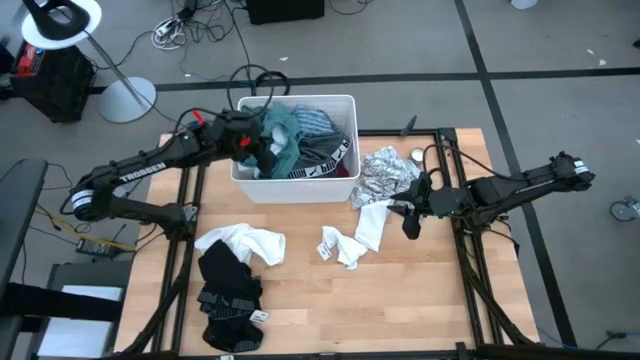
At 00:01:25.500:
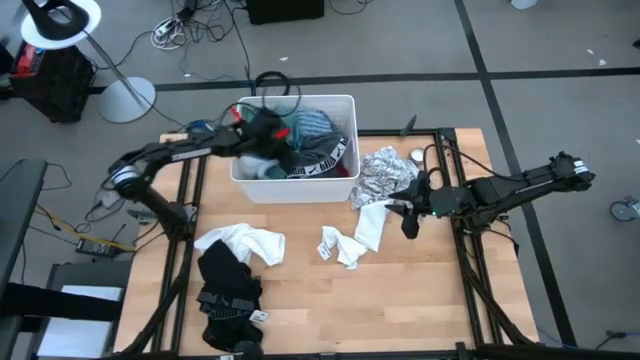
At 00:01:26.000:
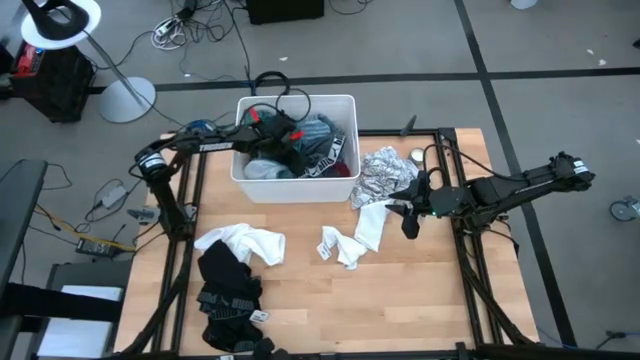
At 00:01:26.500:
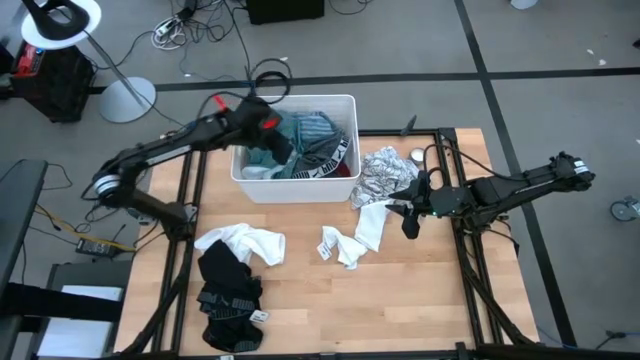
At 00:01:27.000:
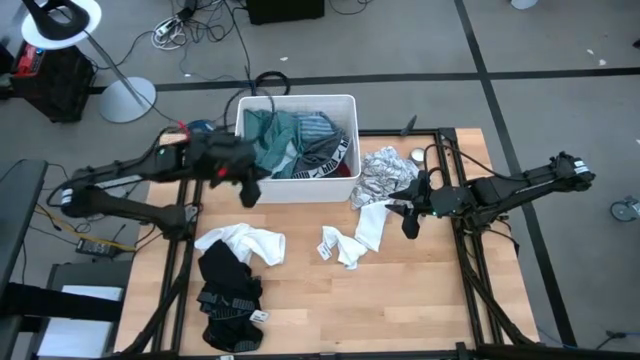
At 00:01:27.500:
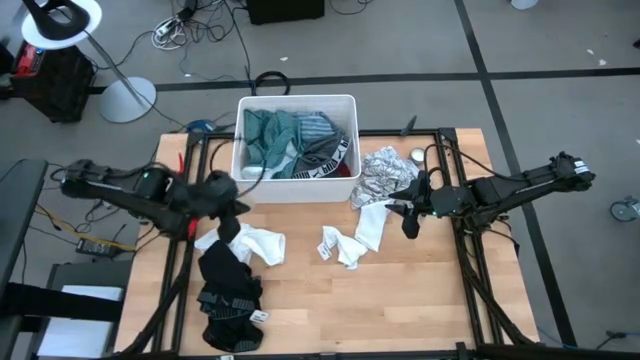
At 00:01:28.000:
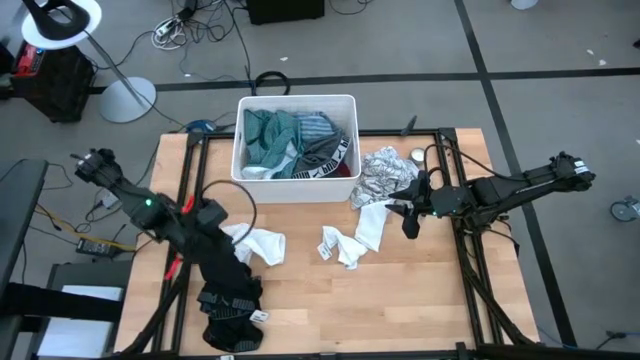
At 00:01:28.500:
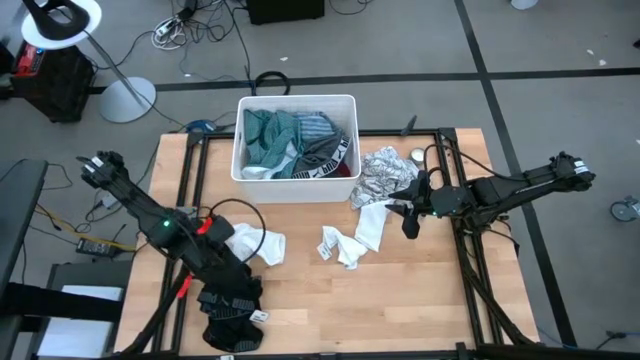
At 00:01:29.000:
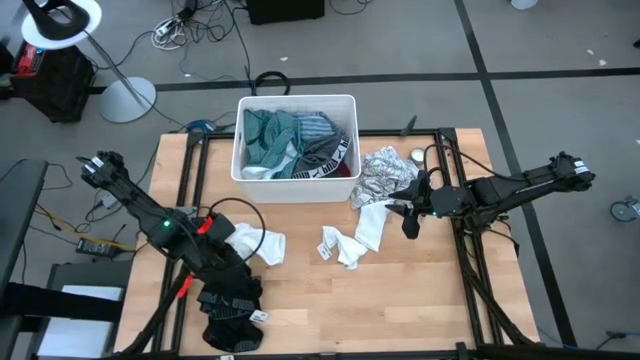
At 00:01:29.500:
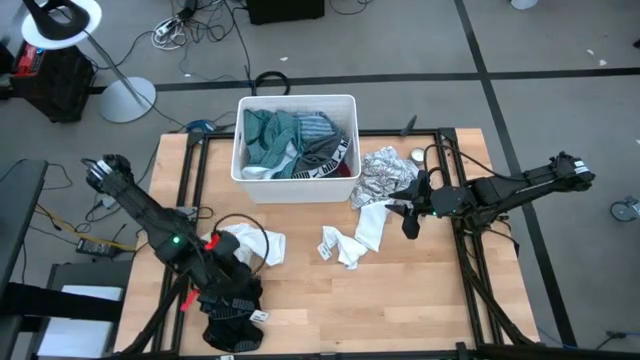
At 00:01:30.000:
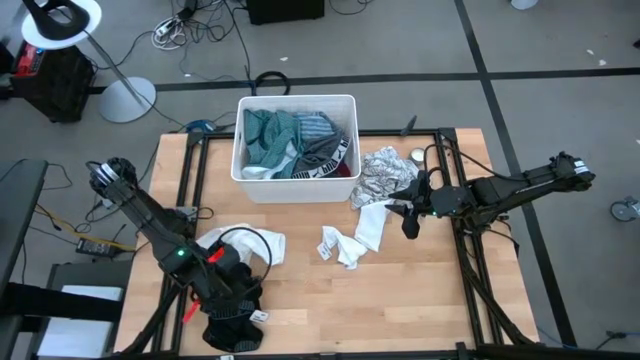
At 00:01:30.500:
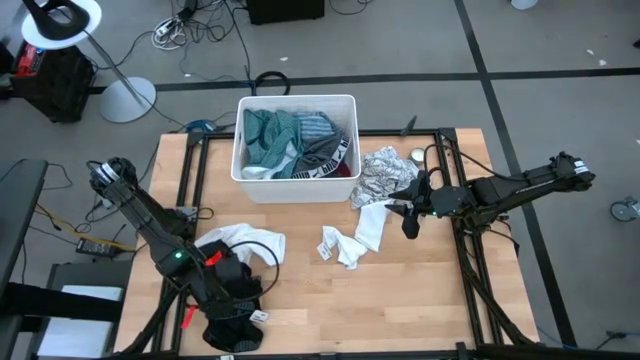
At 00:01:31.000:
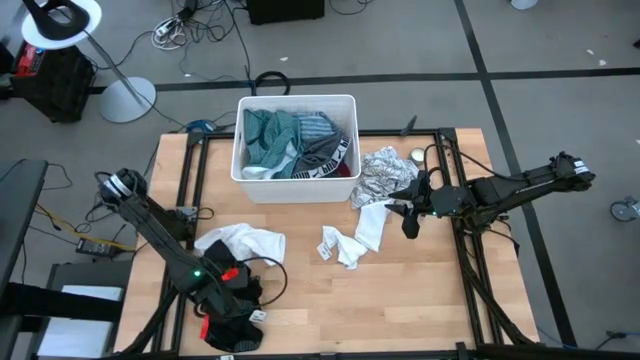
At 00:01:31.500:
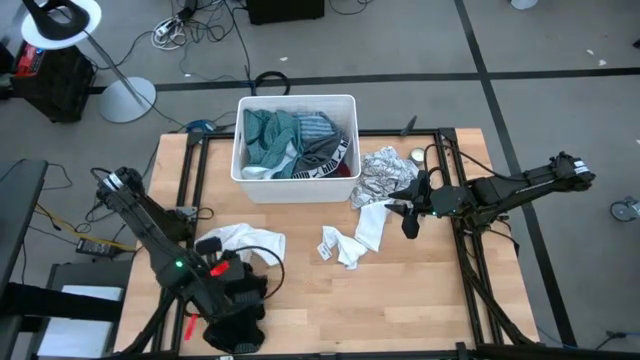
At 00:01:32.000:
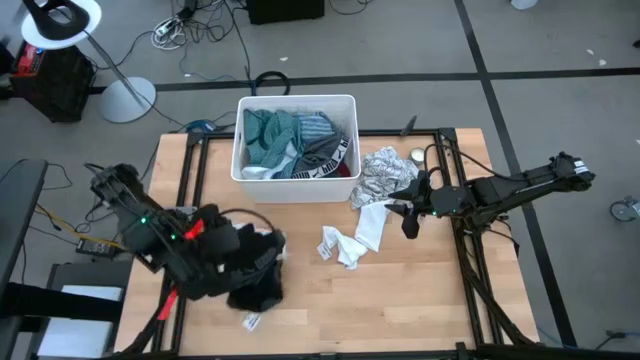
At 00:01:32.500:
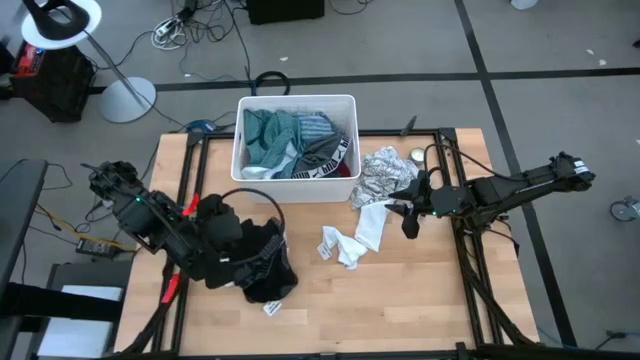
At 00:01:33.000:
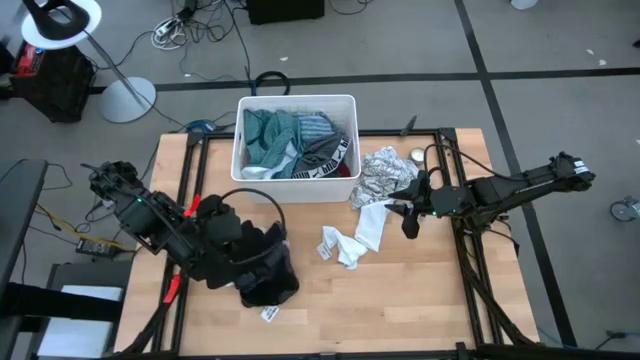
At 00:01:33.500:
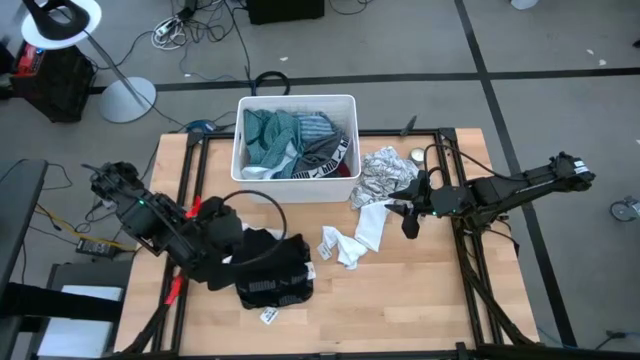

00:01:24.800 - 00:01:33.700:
Task: Sort clothes
Put the black boxer short into the white laundry bin

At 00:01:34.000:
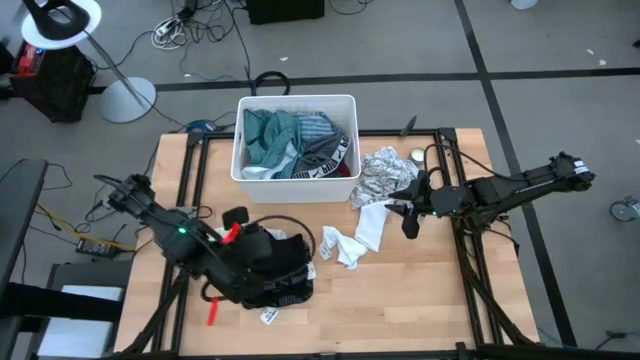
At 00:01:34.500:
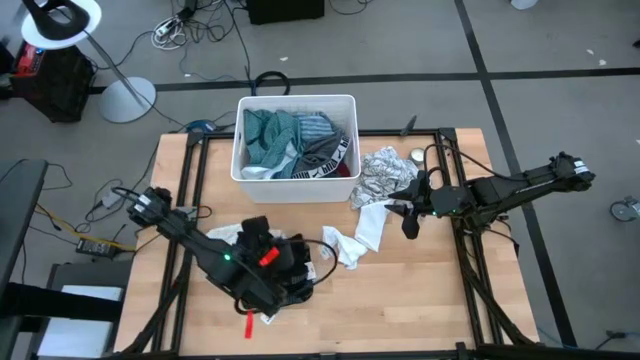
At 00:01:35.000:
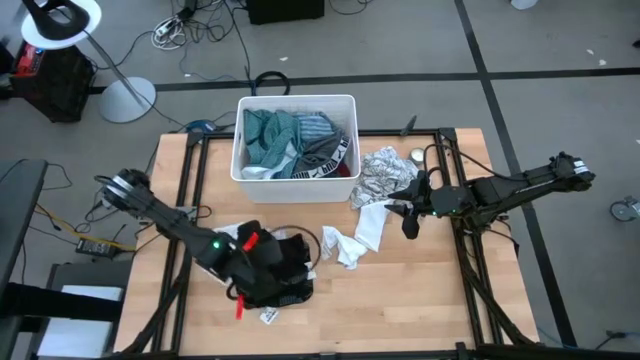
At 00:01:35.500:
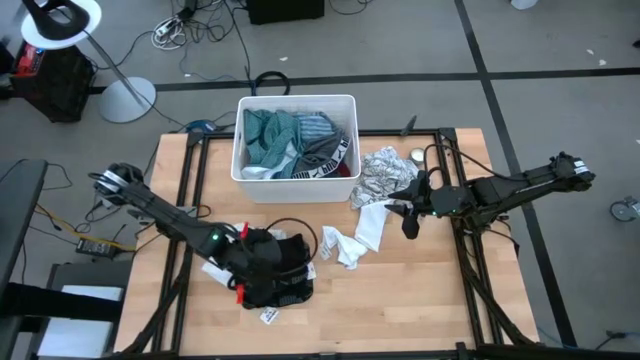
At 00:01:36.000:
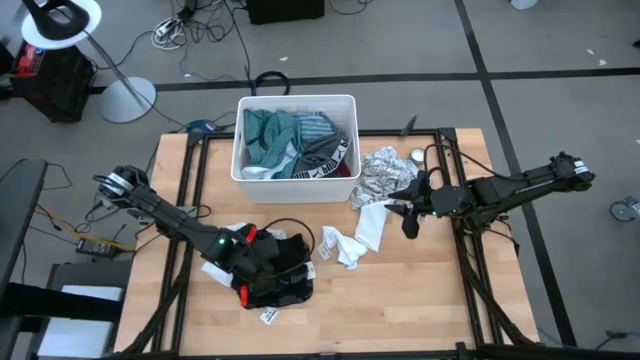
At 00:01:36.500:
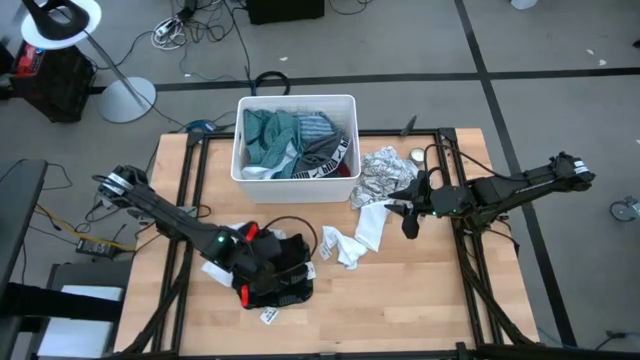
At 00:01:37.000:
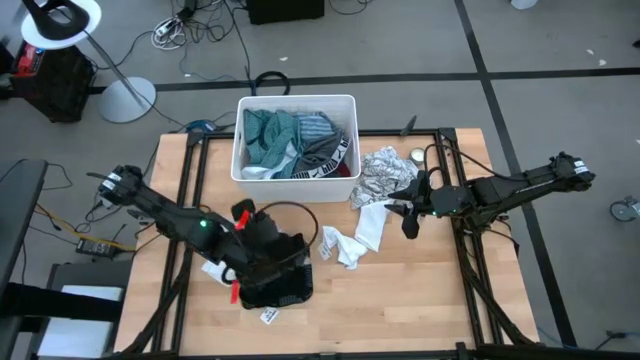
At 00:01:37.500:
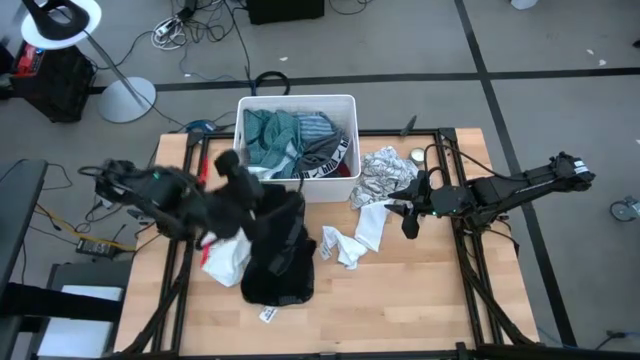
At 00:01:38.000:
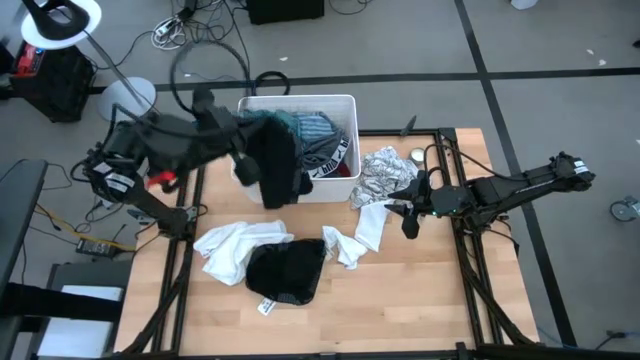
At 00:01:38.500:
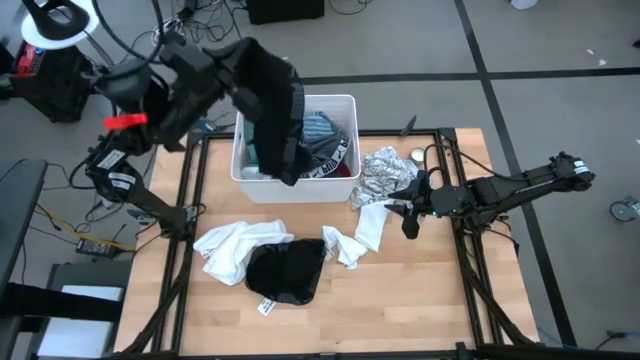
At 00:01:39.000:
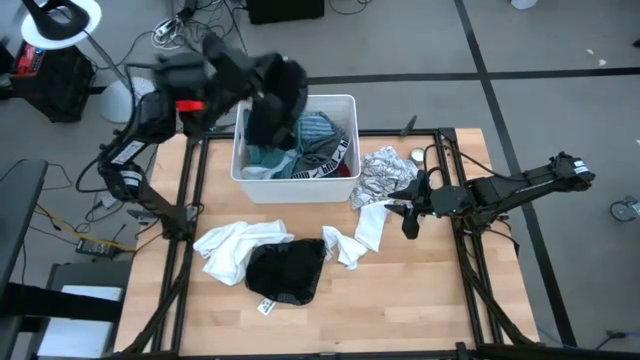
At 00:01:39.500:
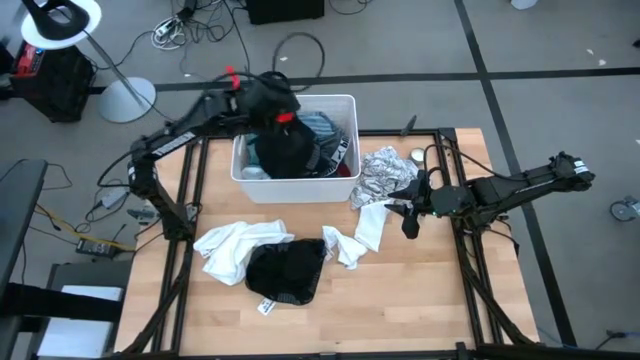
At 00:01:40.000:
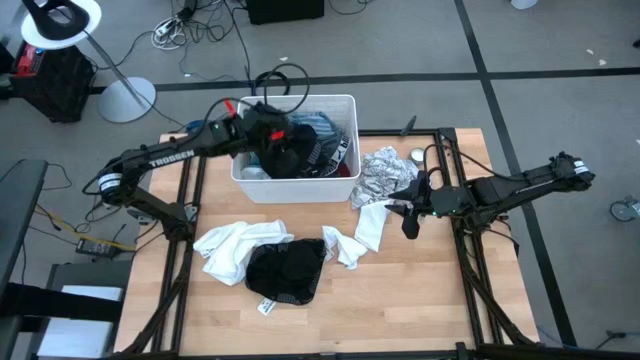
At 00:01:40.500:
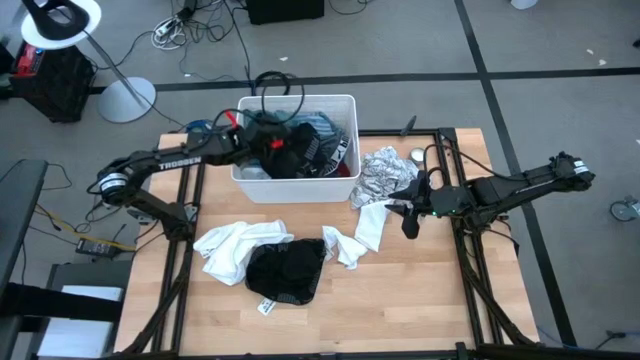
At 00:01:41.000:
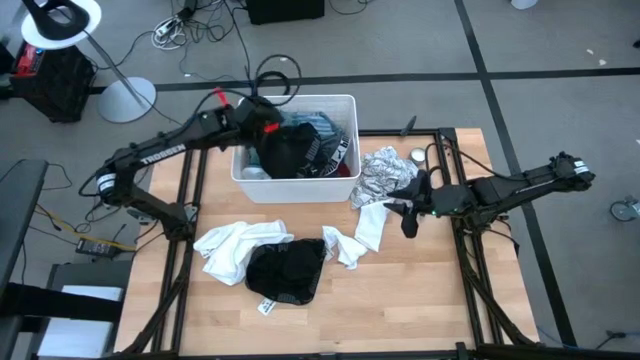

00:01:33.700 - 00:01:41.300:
Put the black boxer into the white laundry bin

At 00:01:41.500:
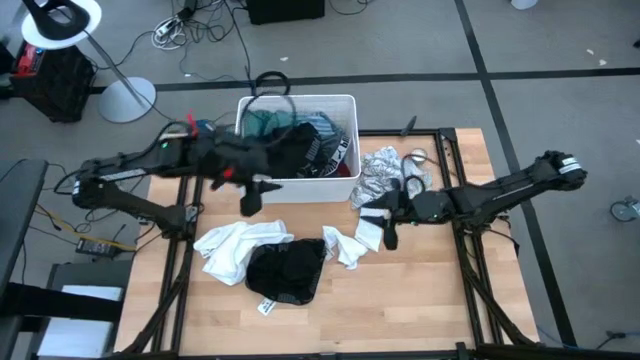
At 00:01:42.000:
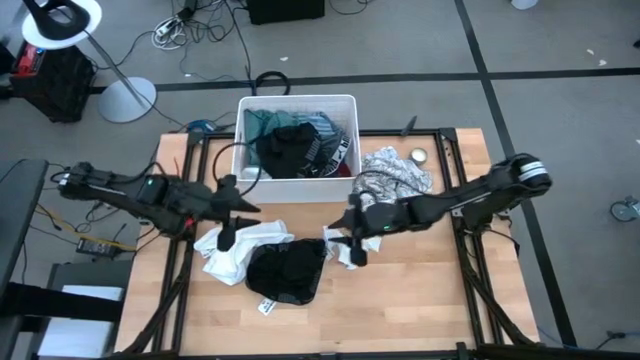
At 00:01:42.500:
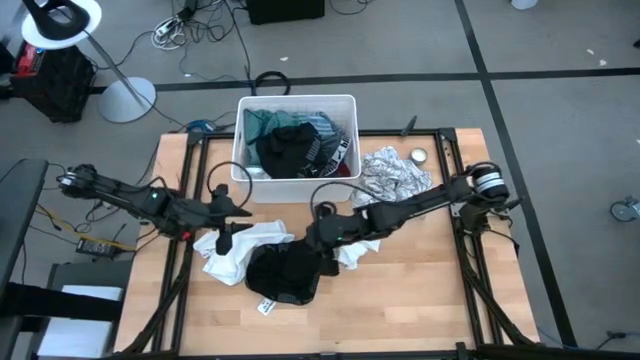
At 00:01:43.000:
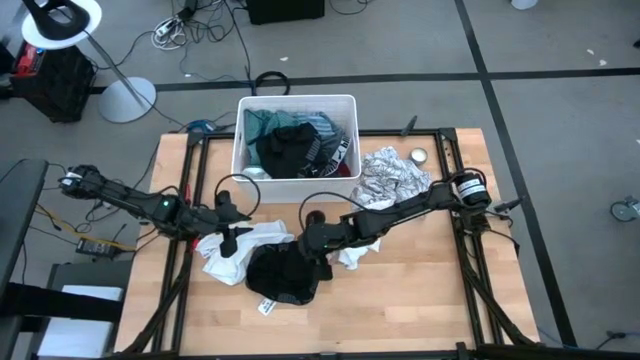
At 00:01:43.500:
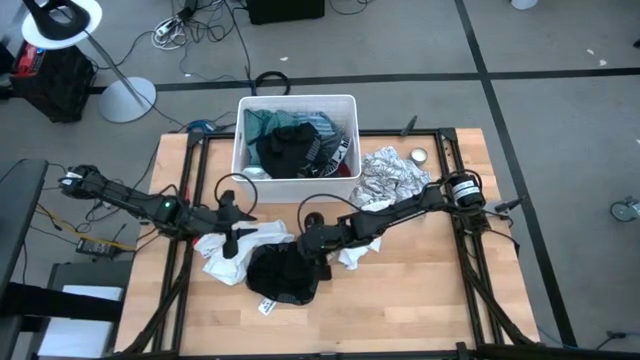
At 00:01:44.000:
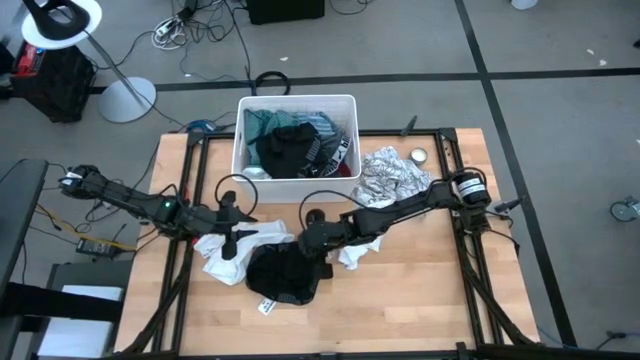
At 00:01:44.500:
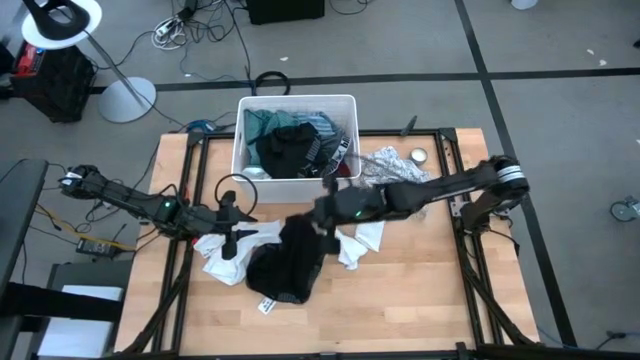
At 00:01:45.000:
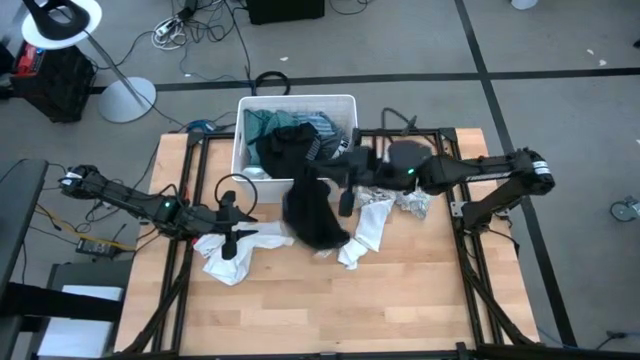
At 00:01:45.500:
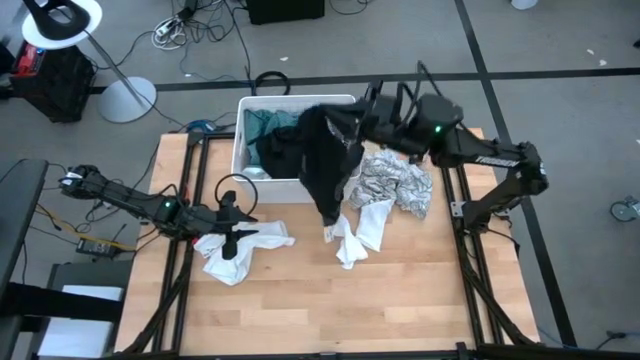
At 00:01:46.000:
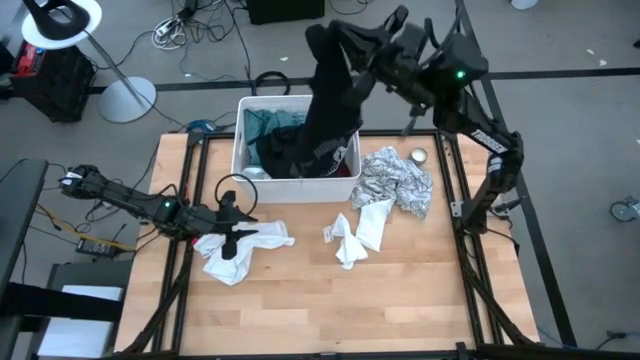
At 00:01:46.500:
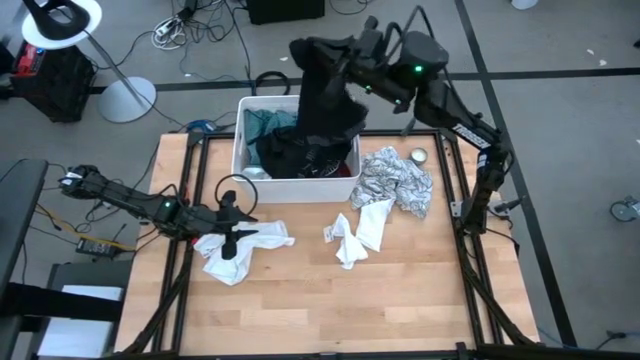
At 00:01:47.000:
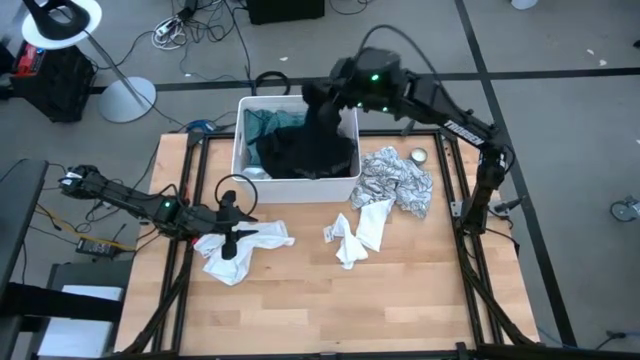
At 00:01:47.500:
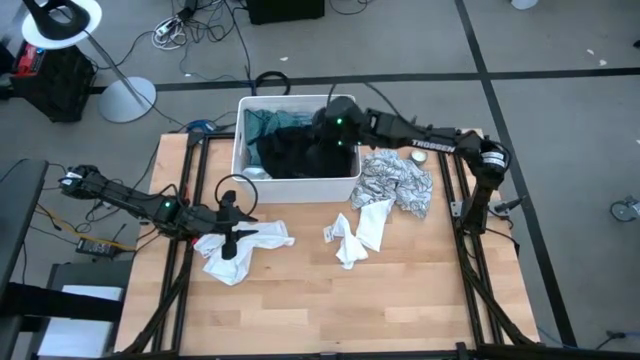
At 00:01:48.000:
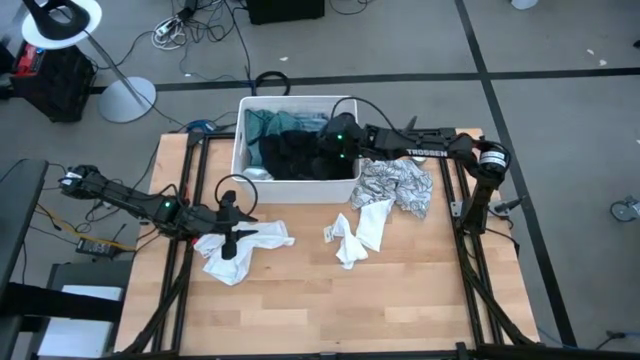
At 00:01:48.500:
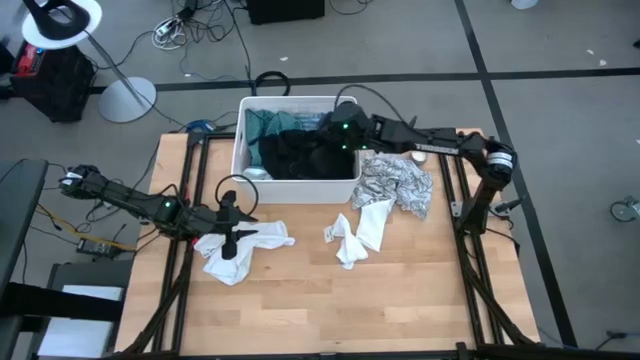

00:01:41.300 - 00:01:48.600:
Put the black boxer into the white laundry bin
